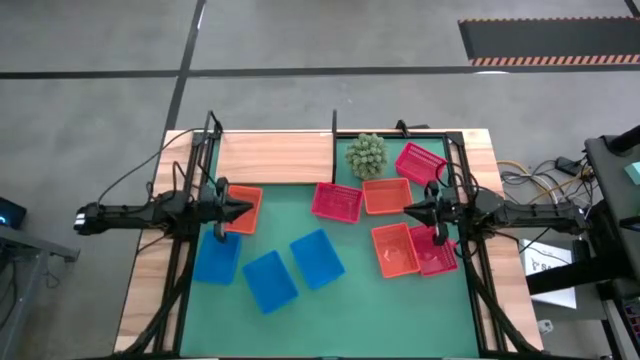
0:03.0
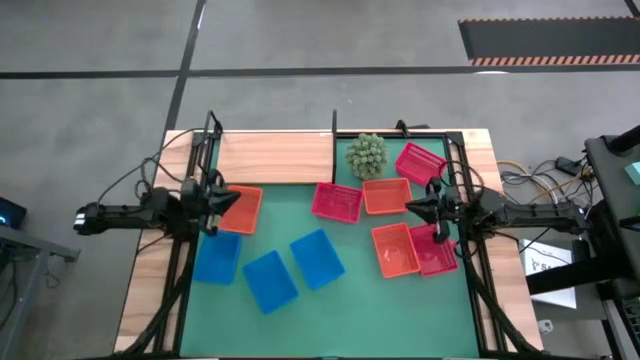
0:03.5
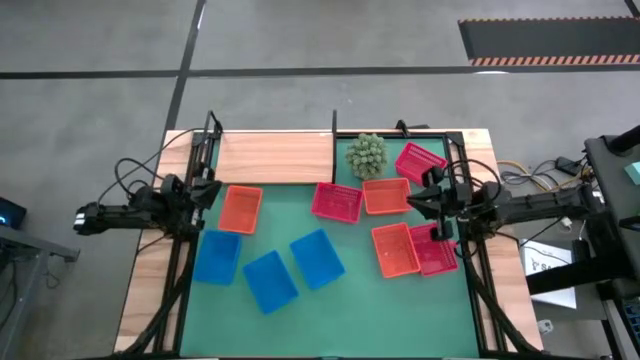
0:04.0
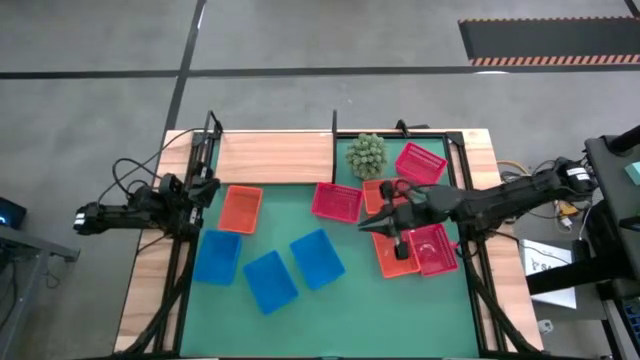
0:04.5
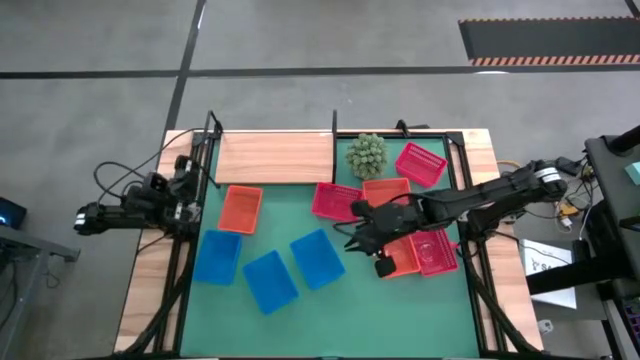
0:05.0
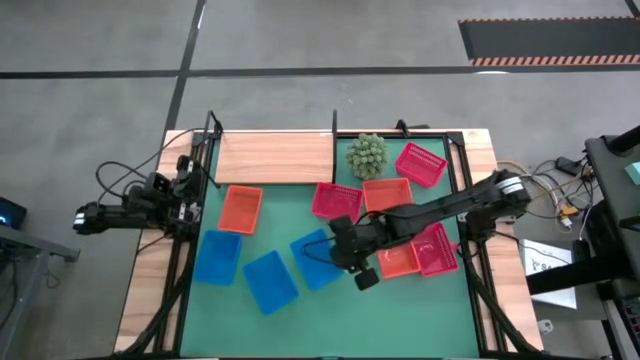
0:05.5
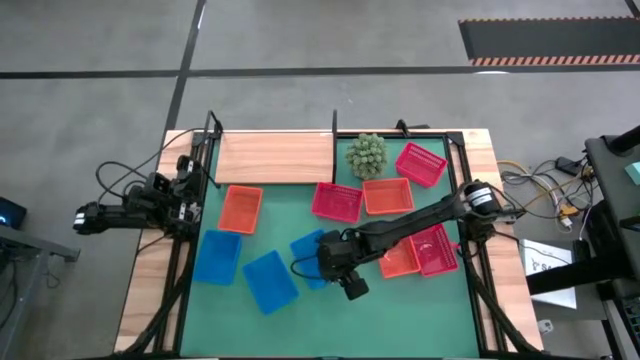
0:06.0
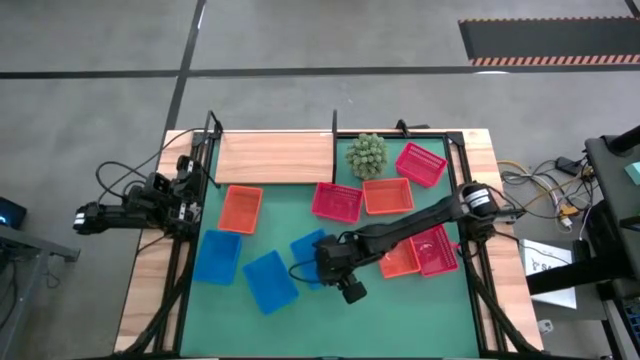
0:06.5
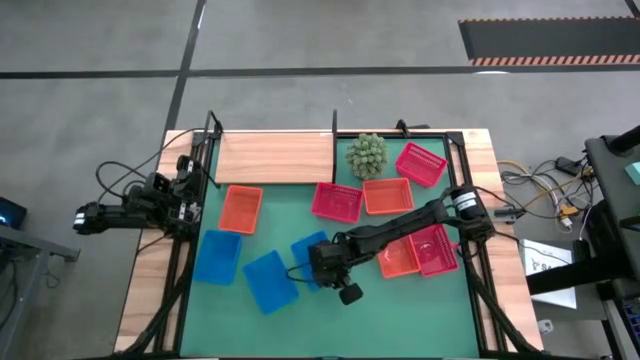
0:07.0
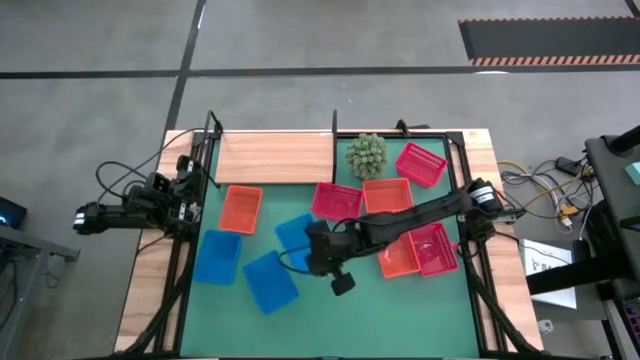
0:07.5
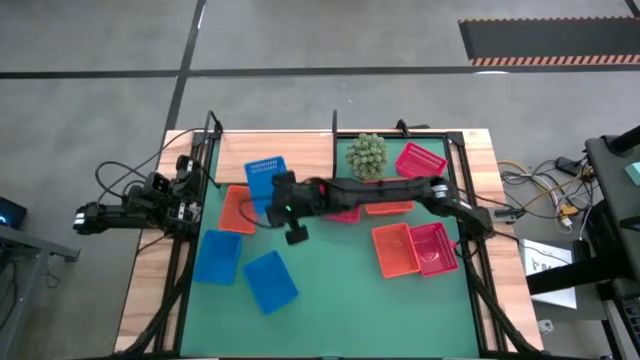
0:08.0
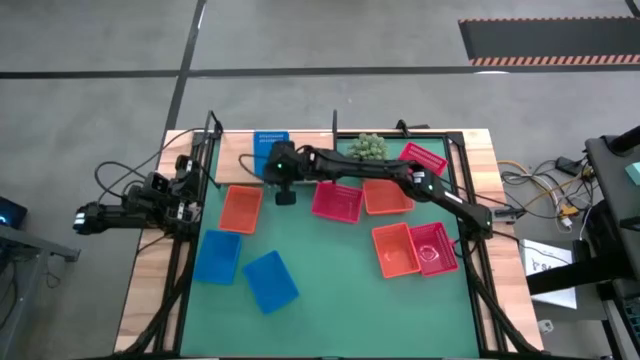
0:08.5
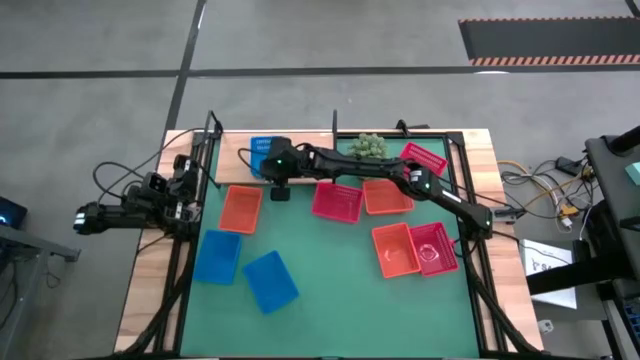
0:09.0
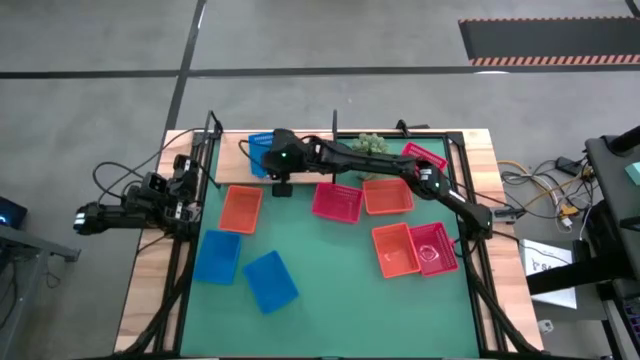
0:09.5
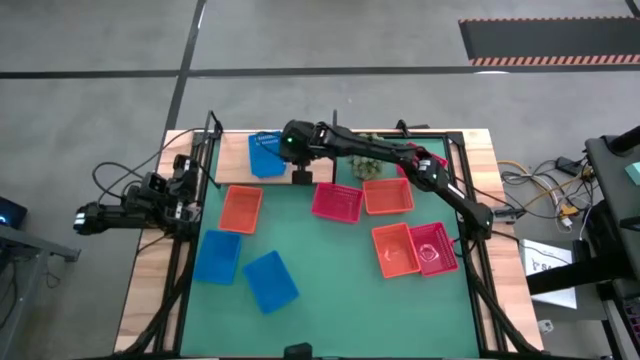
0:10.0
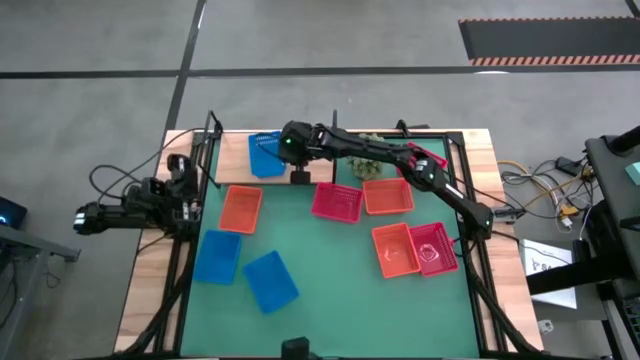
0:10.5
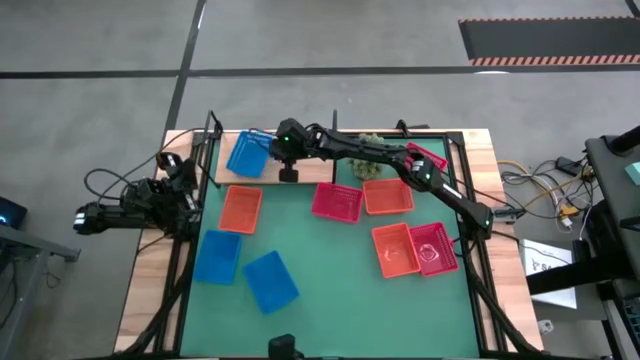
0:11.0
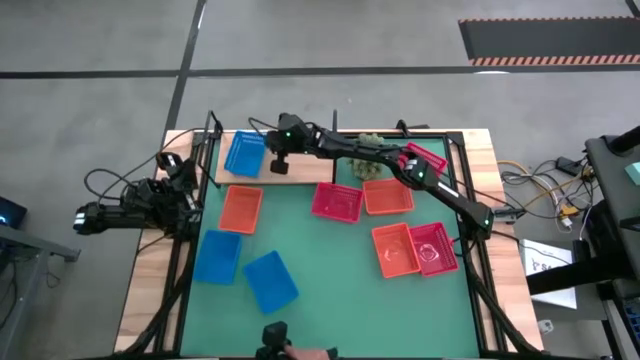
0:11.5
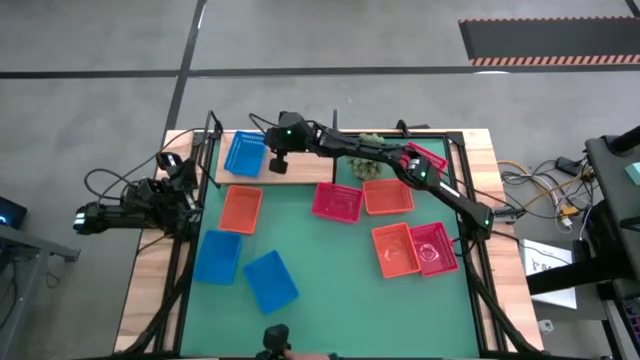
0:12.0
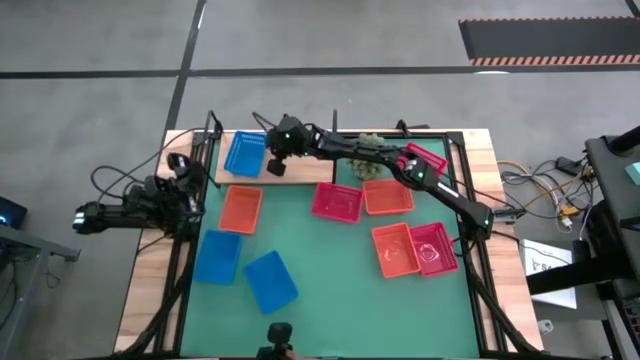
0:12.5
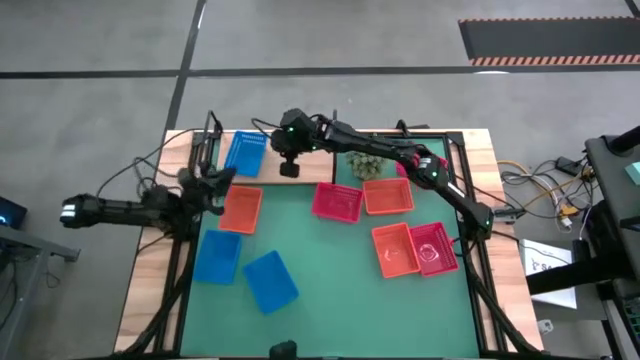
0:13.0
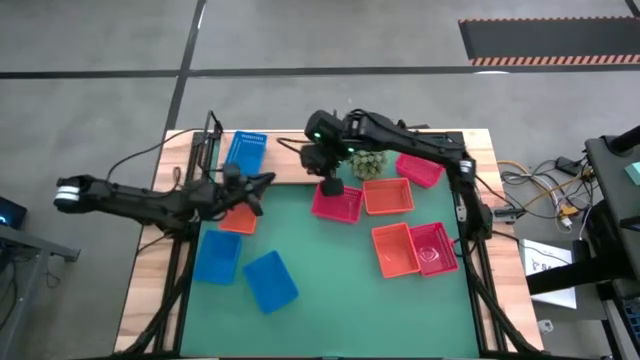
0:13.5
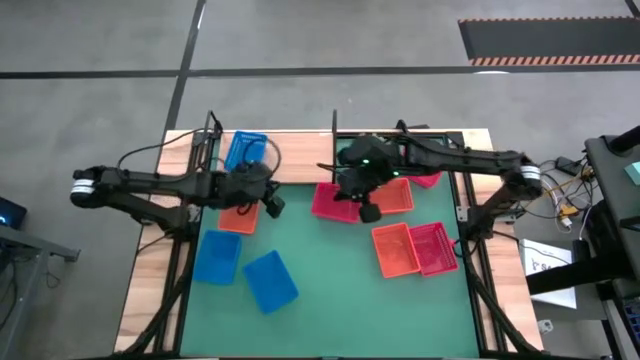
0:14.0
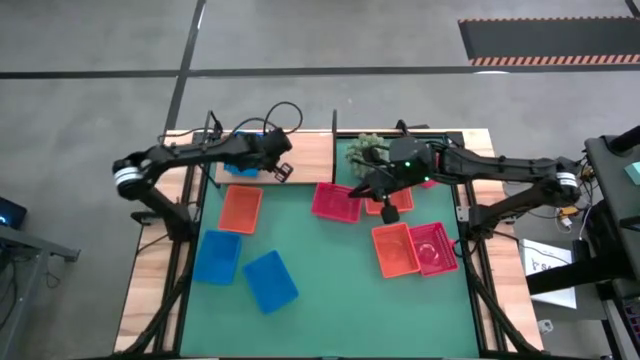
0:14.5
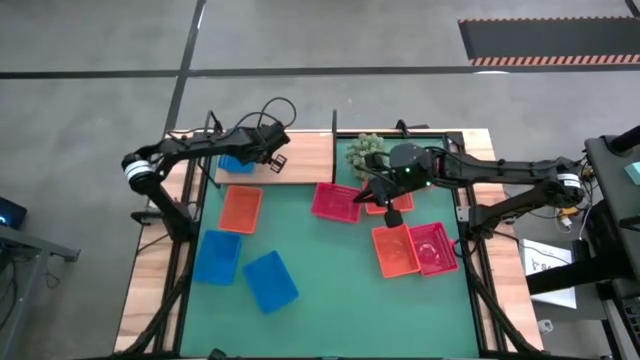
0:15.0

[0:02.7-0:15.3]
Task: Stack baskets on shelf by color
Put the right blue bin on the shelf

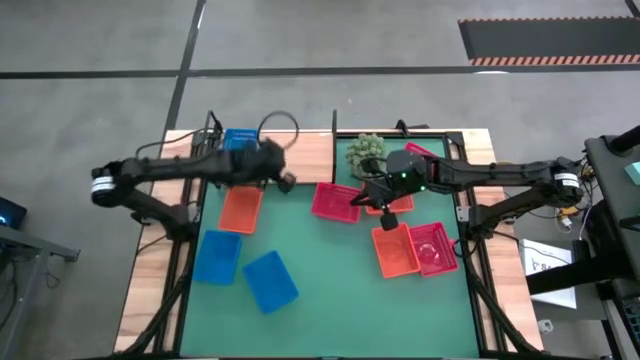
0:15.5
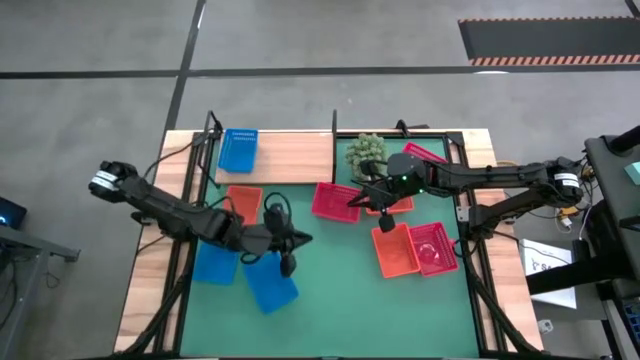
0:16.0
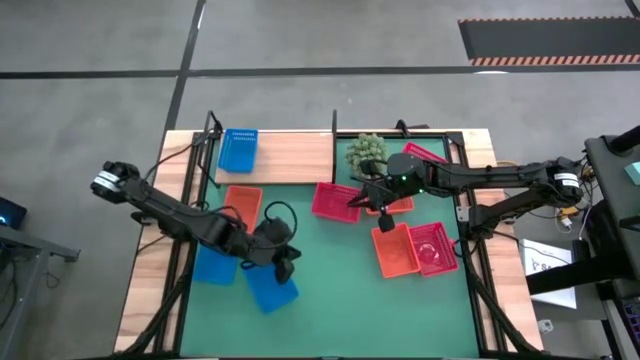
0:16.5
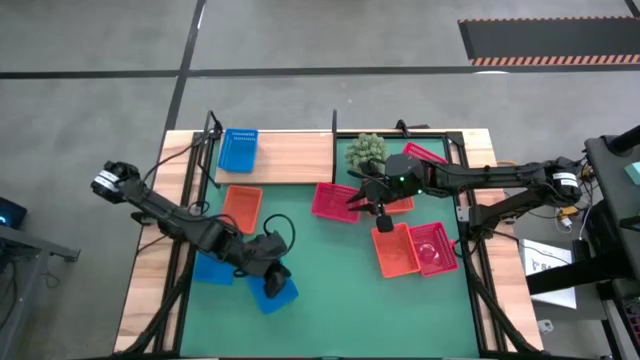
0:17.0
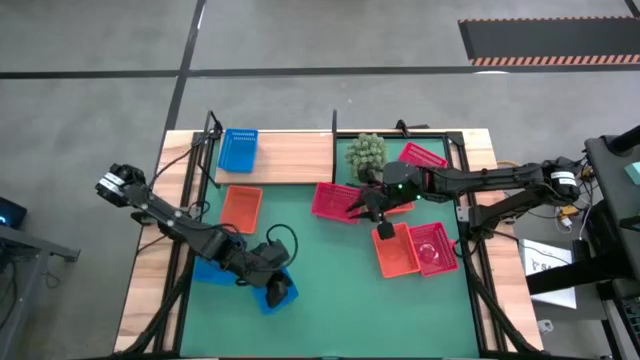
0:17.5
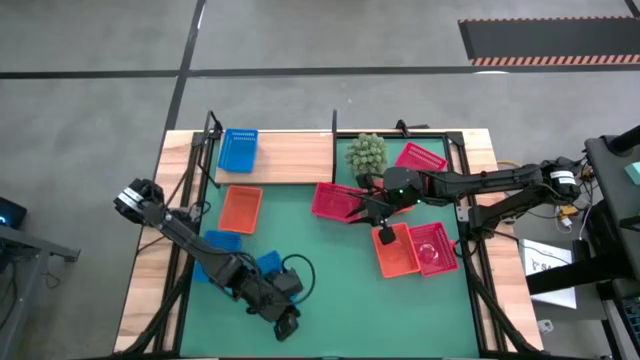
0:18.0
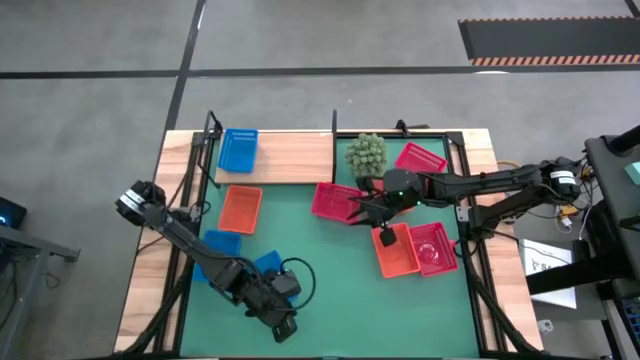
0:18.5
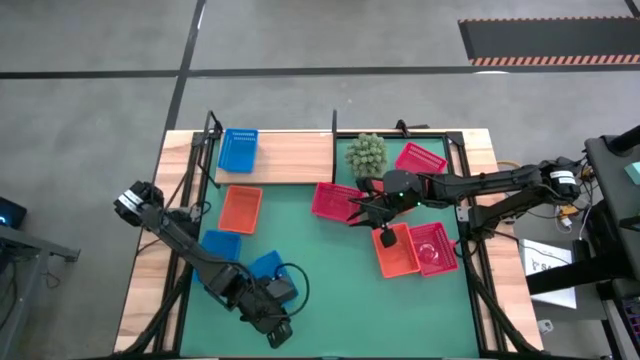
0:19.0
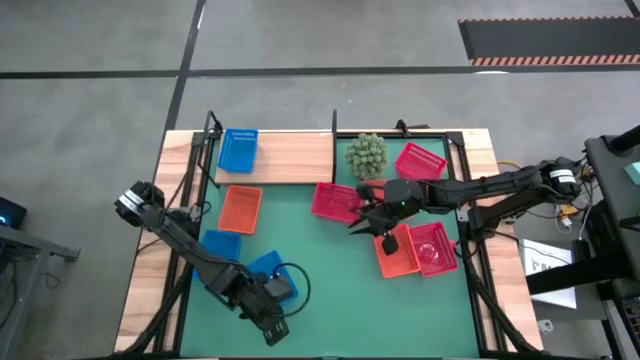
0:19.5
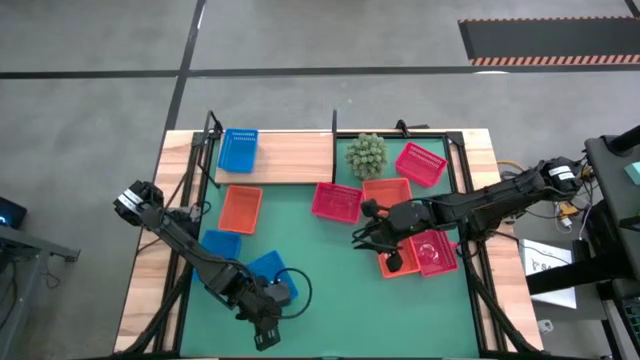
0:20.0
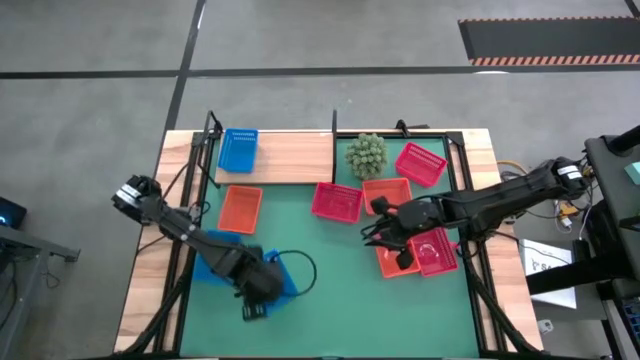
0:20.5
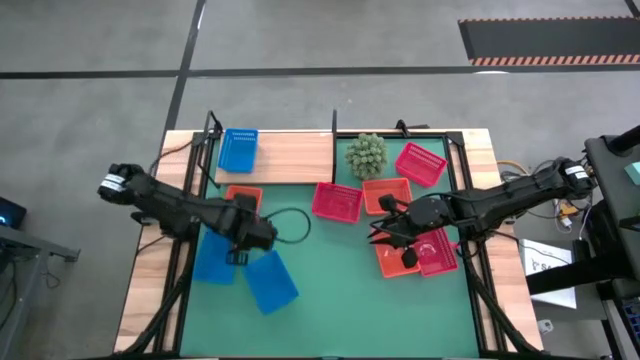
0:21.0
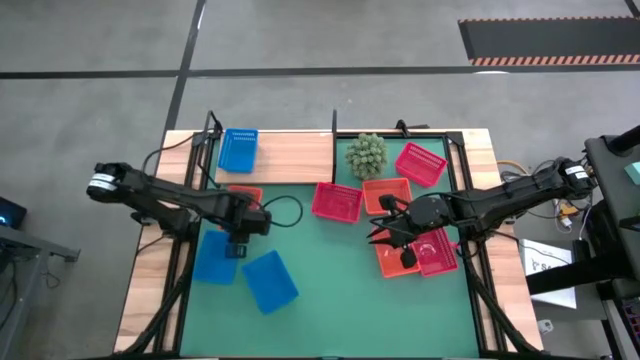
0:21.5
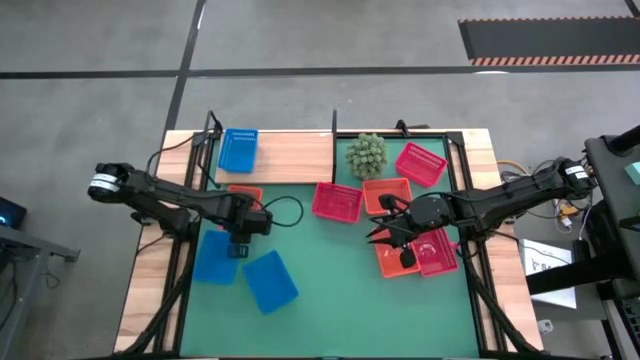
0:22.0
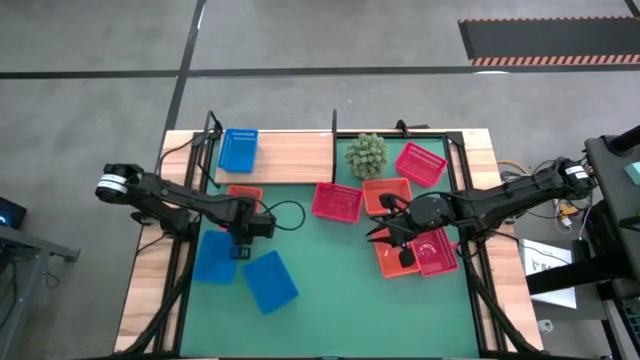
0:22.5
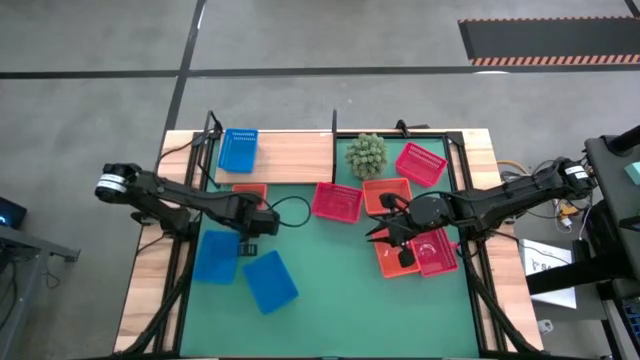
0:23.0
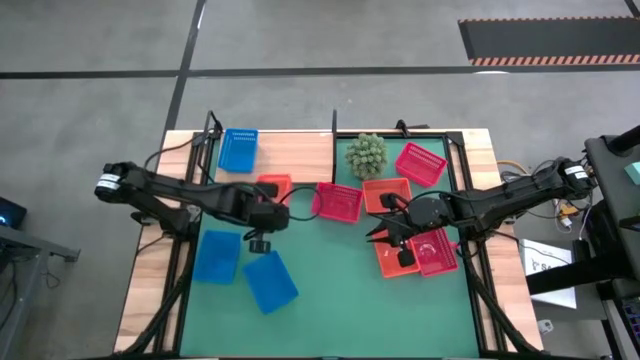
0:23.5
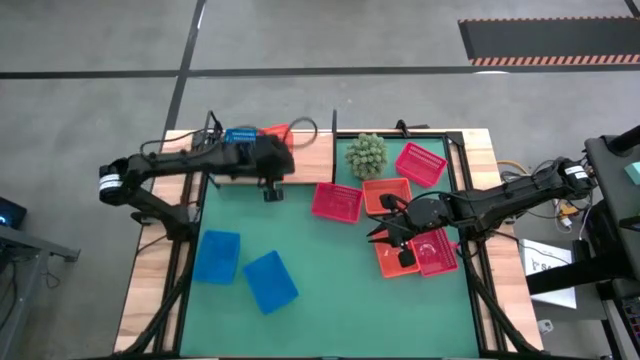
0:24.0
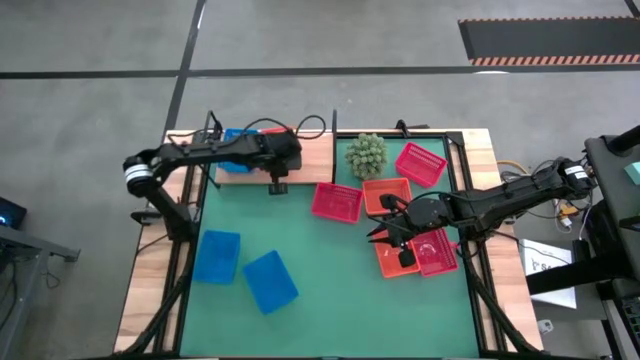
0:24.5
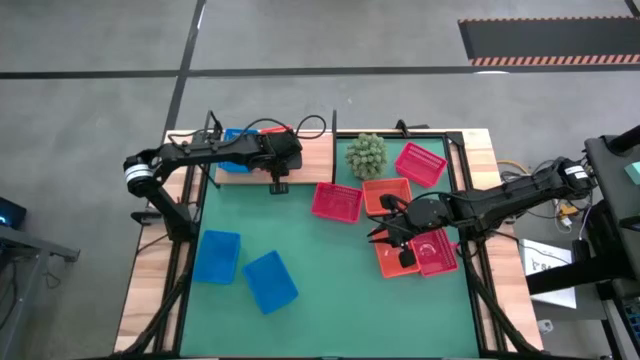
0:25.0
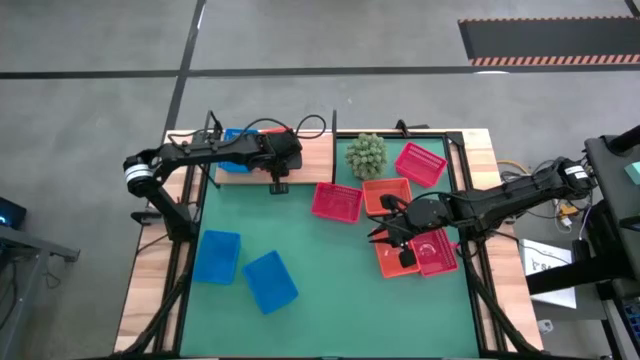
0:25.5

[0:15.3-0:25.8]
Put the left orange bin on the shelf
